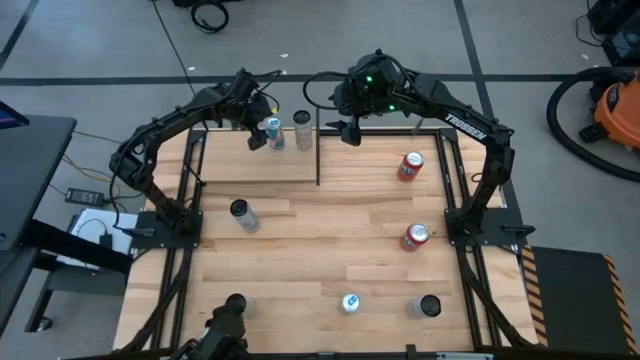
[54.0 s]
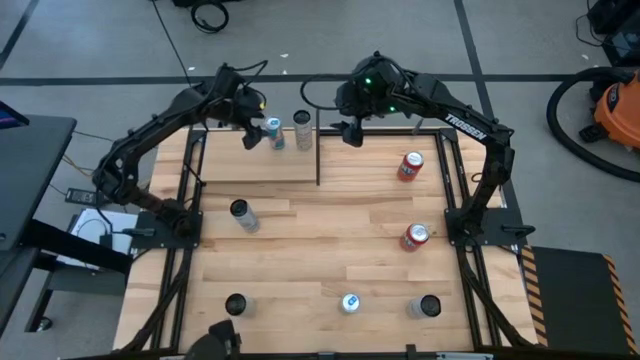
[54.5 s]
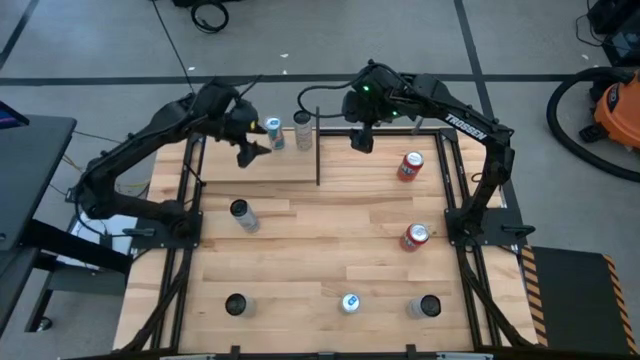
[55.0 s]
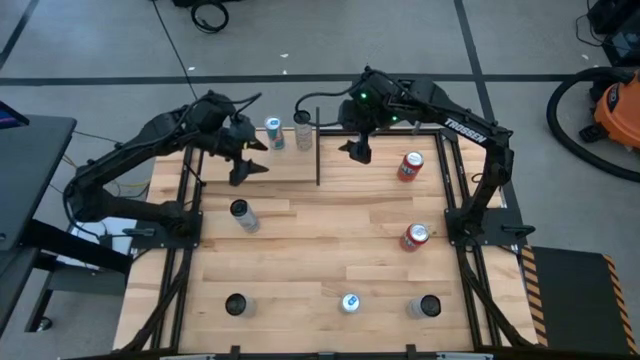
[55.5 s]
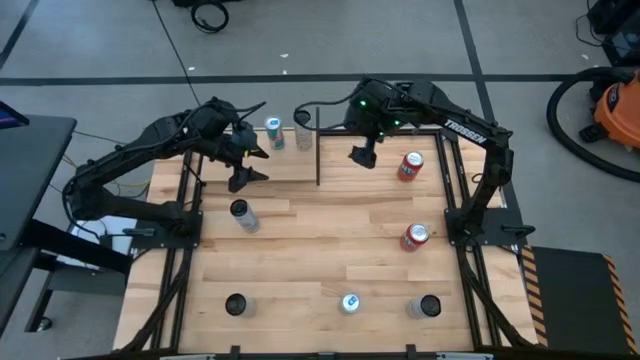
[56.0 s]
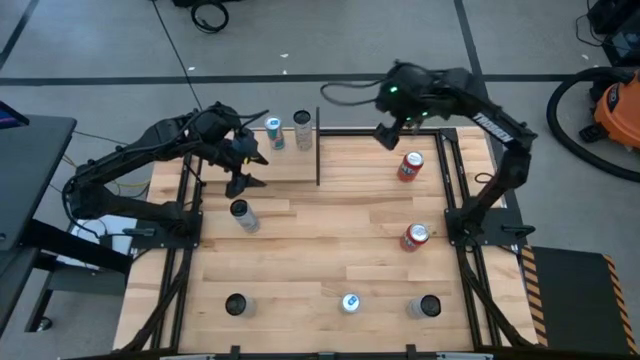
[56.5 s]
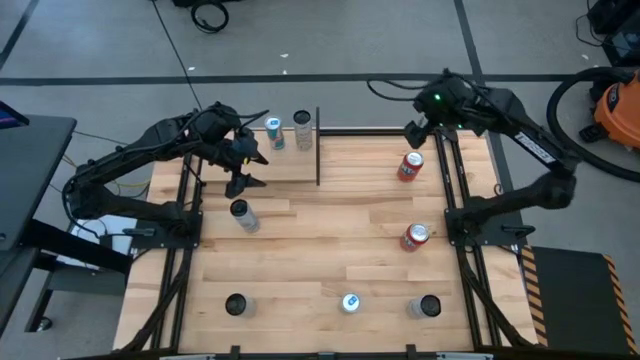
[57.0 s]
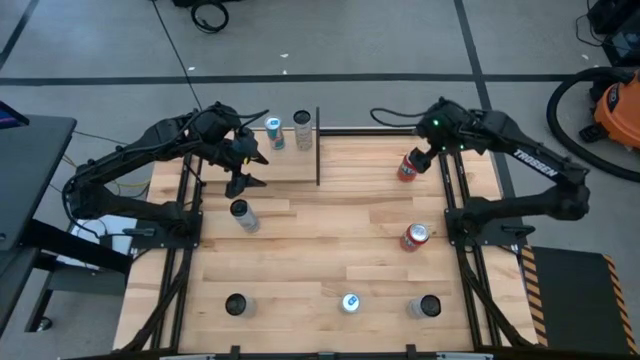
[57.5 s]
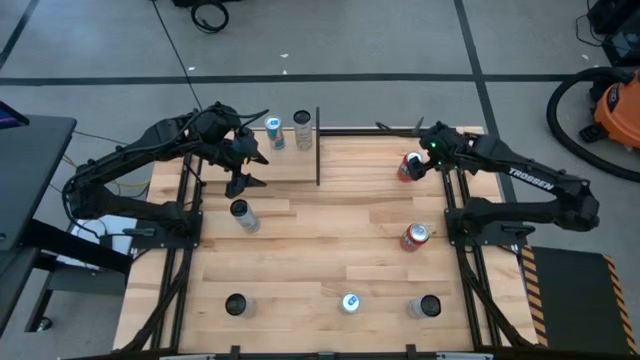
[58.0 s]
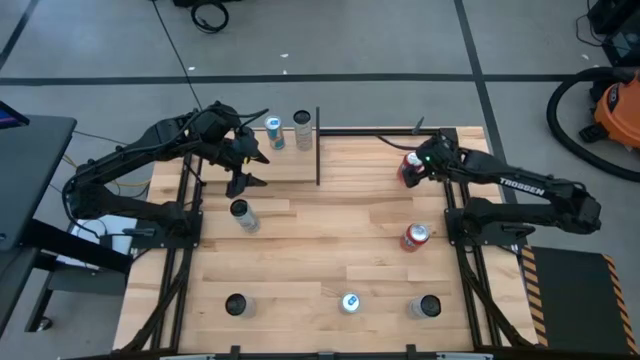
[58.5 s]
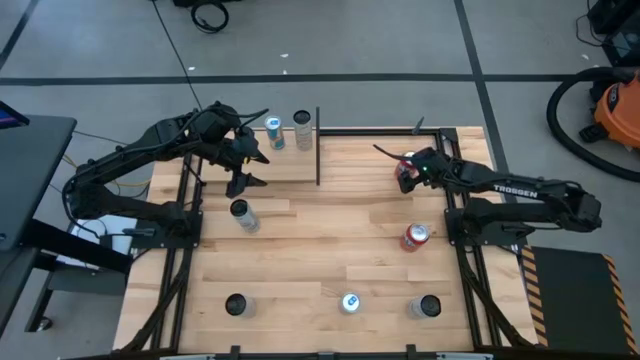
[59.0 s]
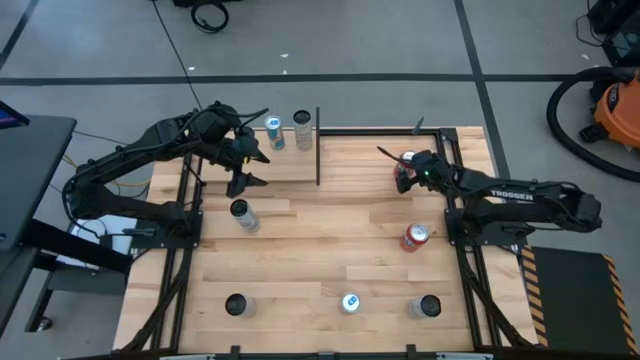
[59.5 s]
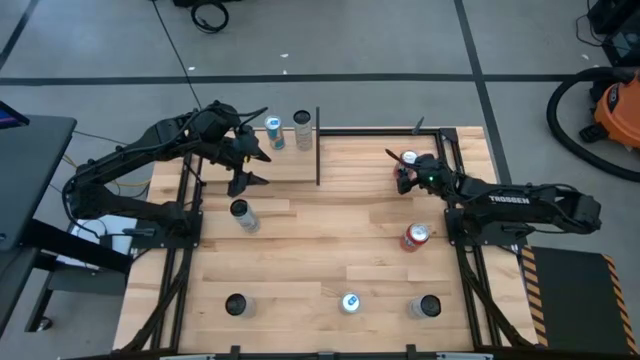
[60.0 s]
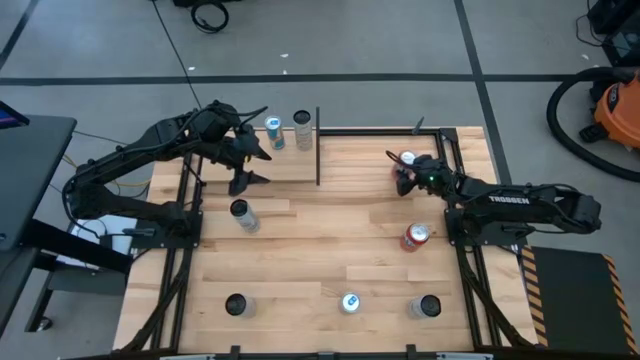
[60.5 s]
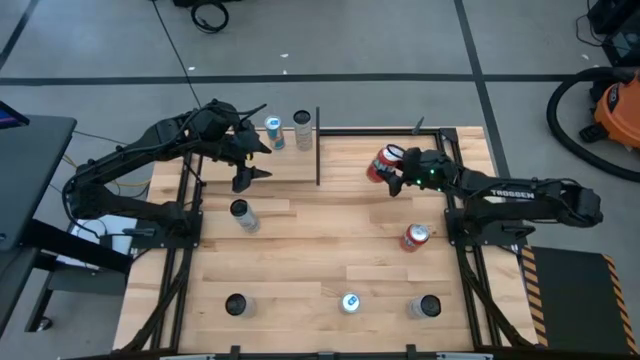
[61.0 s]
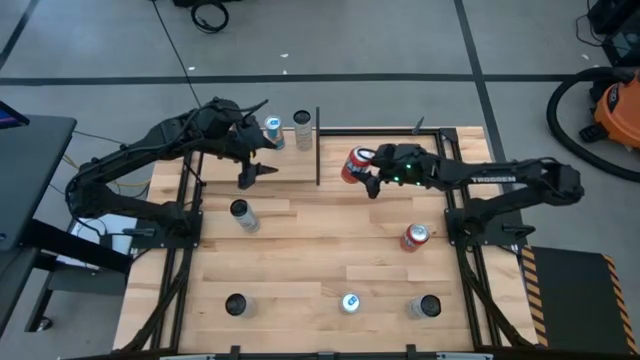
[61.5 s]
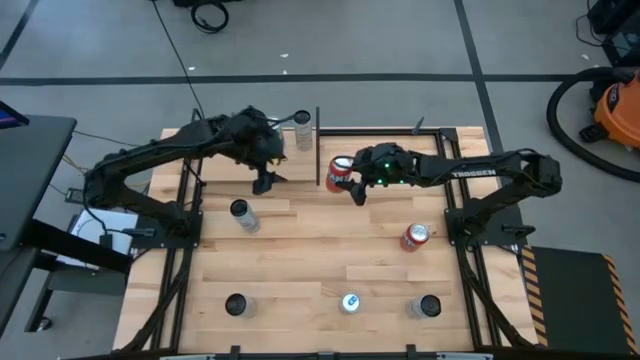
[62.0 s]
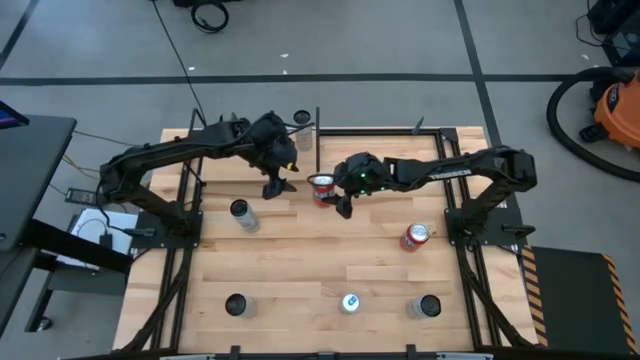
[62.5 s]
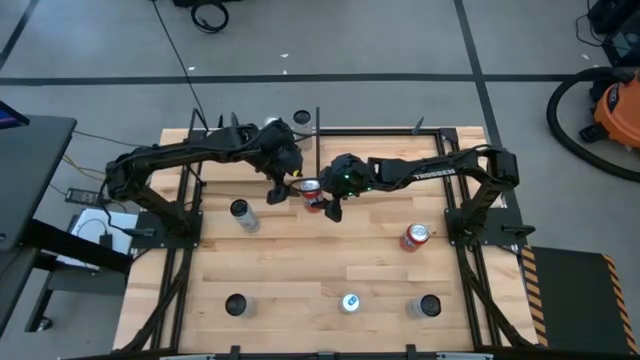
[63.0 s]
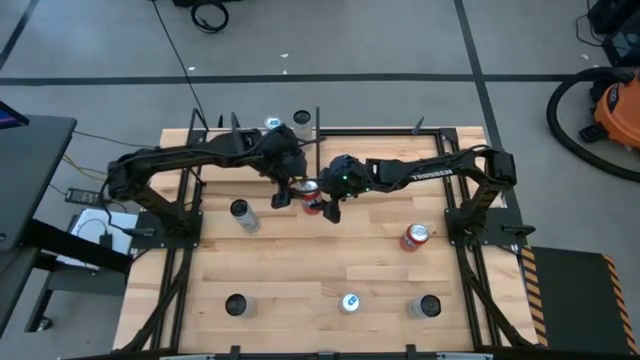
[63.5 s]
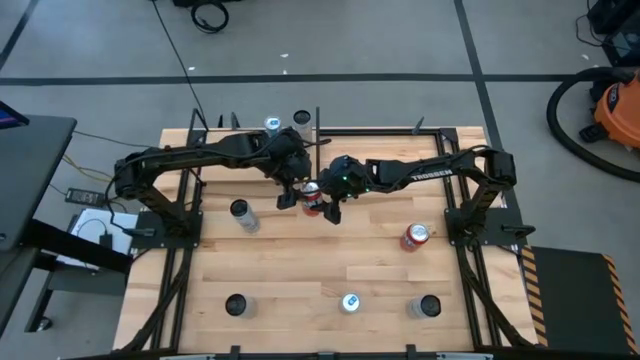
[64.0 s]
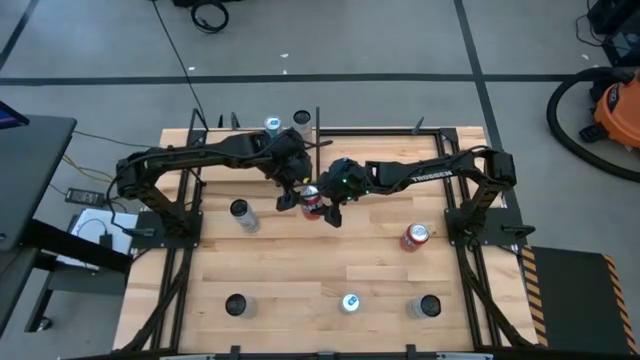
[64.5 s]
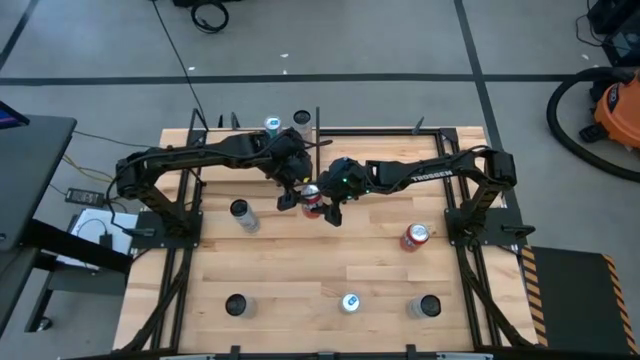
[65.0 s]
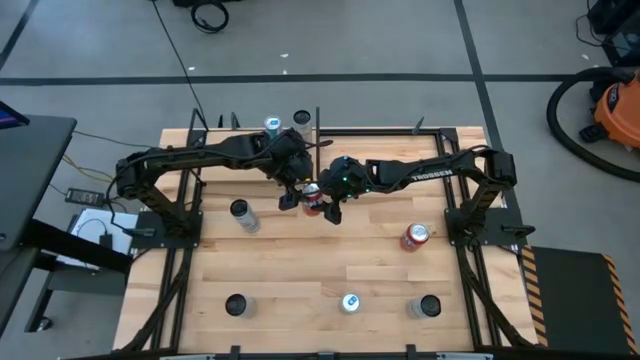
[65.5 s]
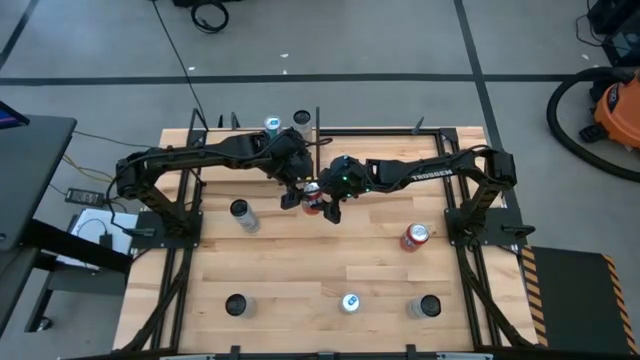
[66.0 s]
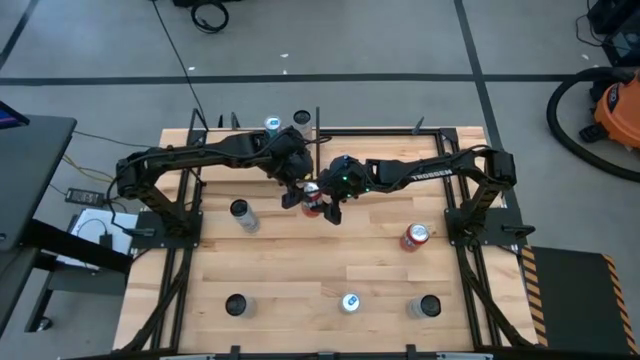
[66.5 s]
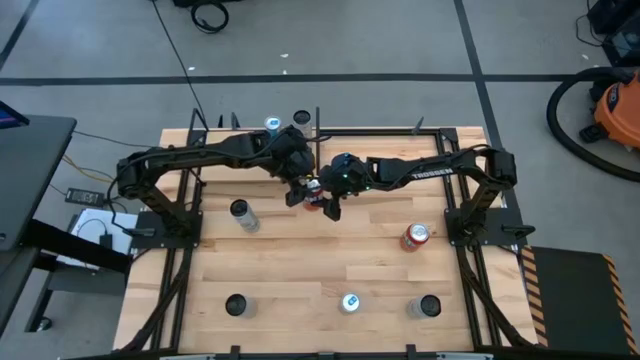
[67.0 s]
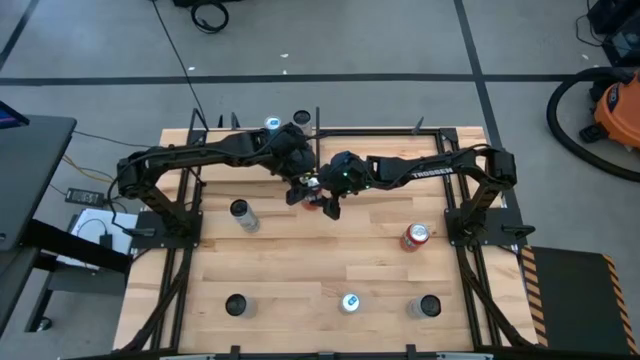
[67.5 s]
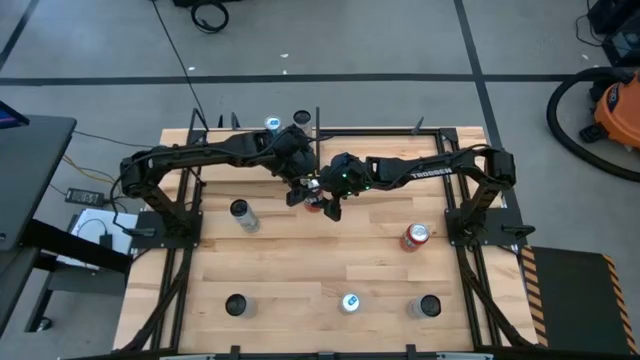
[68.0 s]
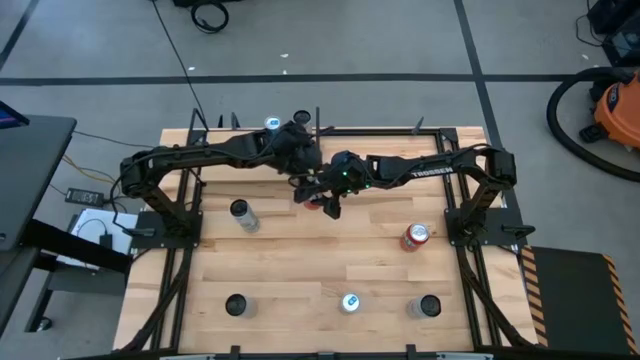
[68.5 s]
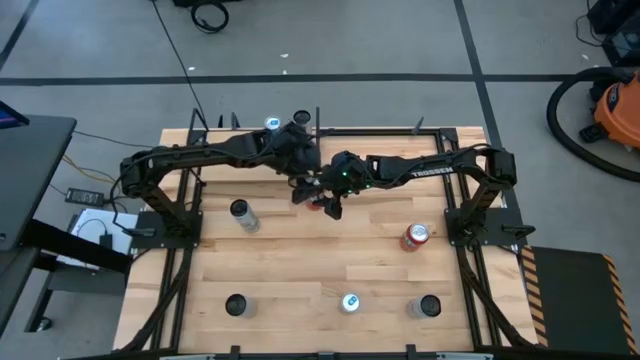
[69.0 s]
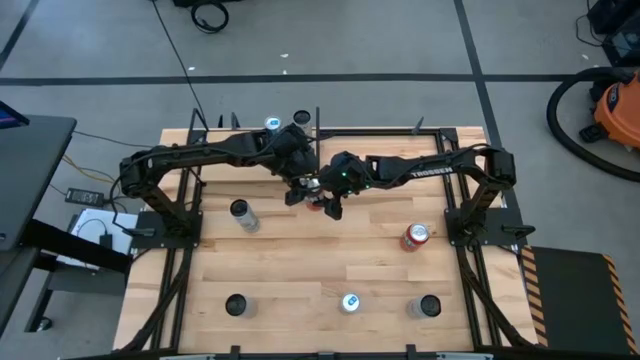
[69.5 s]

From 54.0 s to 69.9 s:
Task: Place canned beverage on shelf
Put the top orange soda can on the shelf

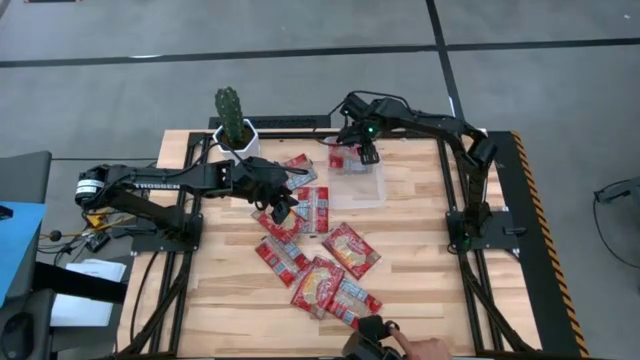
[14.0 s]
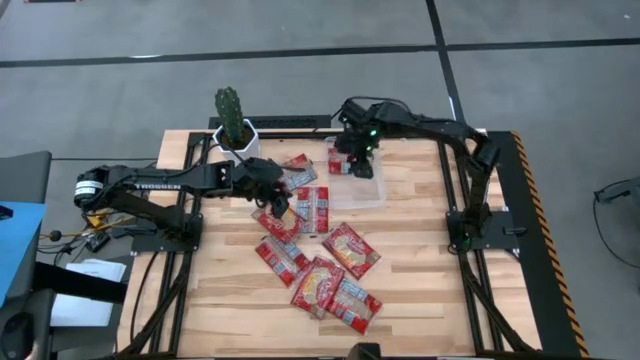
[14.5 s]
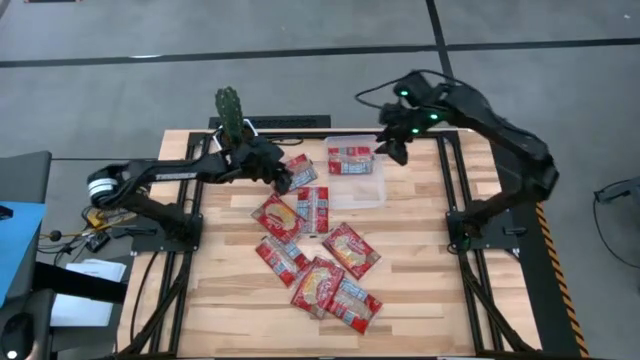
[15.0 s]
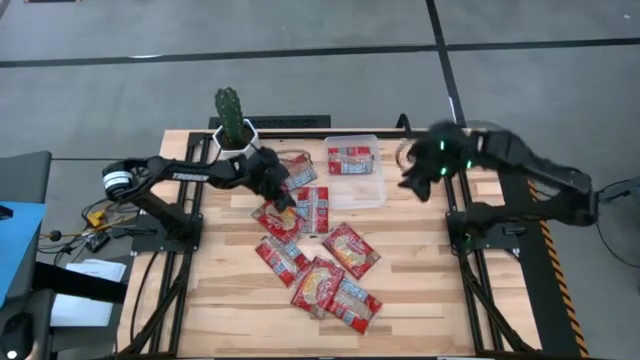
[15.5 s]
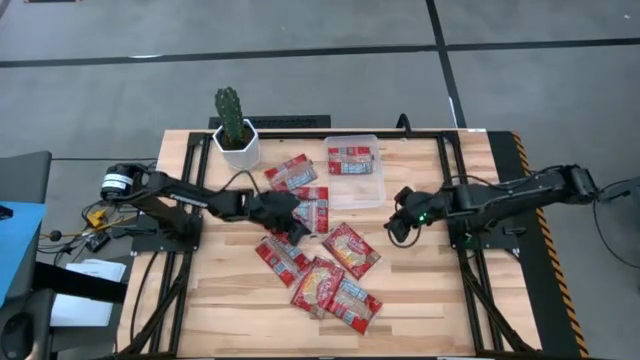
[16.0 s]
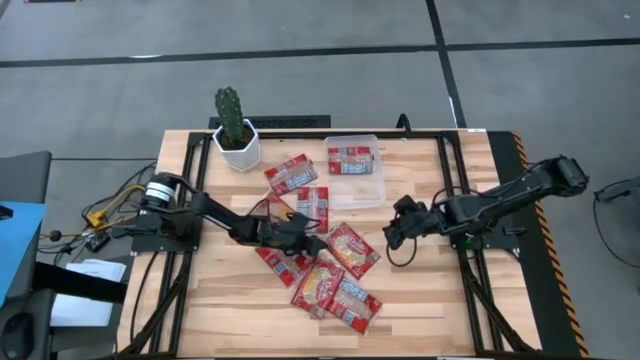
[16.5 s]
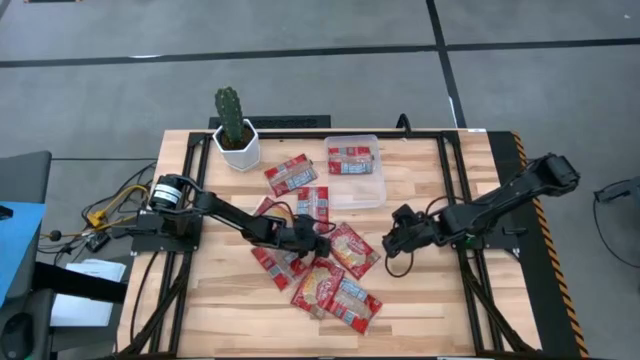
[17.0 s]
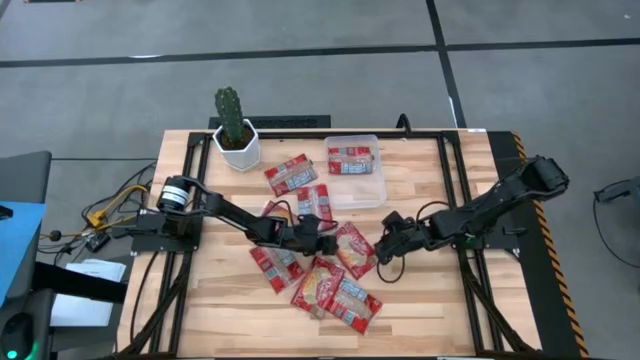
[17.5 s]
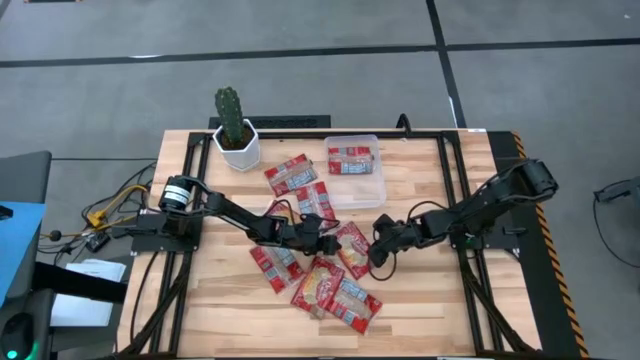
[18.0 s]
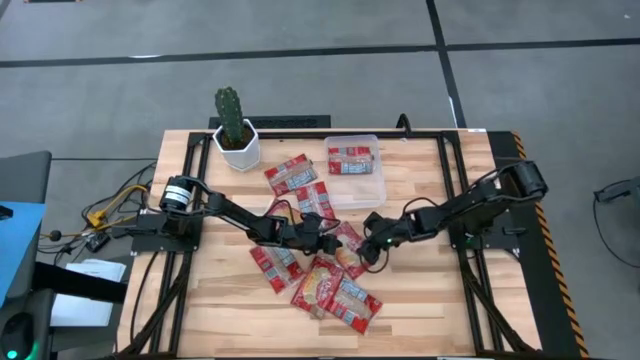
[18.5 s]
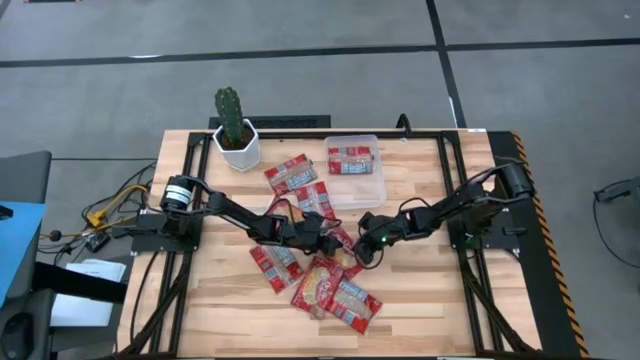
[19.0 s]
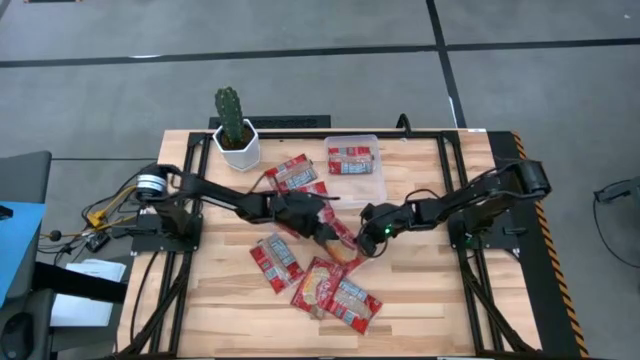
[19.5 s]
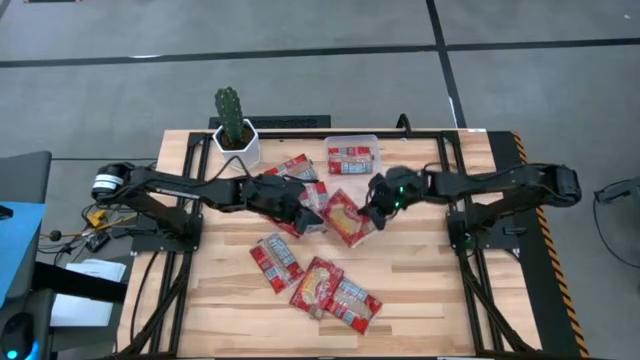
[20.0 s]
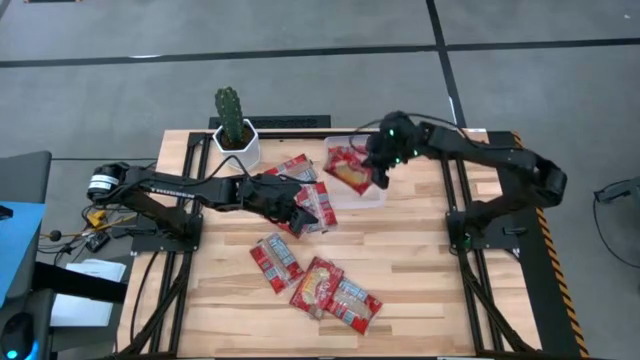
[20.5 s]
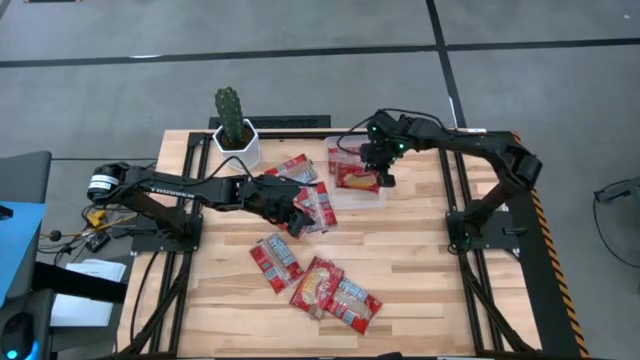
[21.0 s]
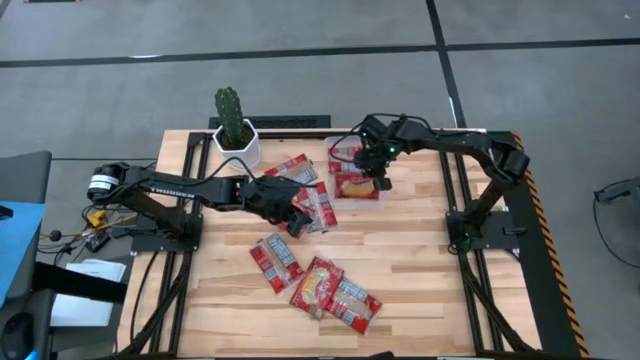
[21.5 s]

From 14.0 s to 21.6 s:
Task: Sort popcorn bags into baskets
Put the popcorn bag into the transparent bin
